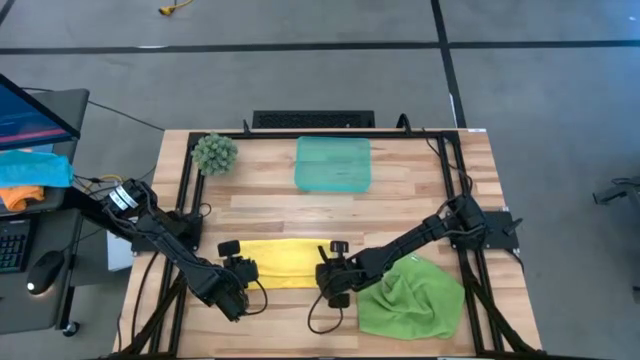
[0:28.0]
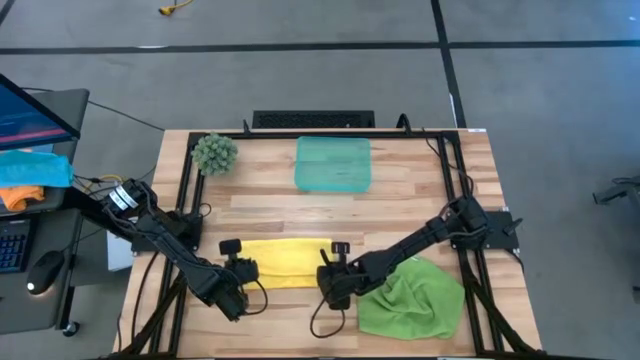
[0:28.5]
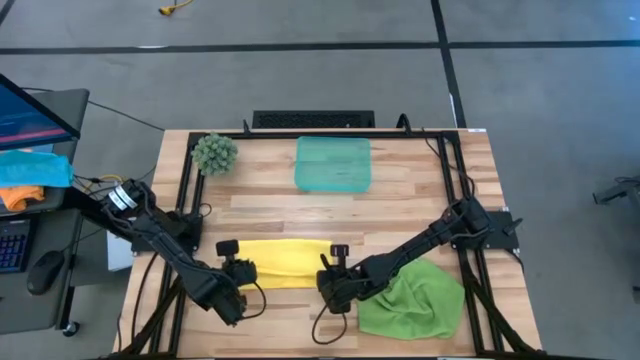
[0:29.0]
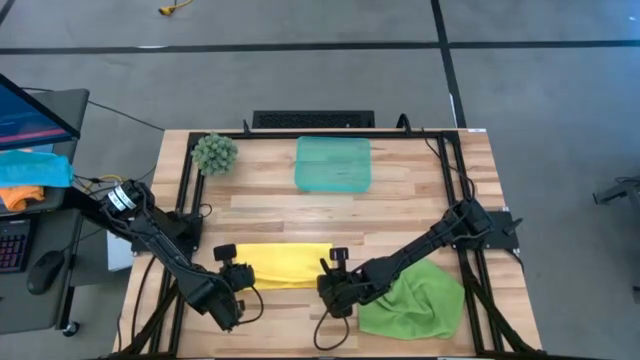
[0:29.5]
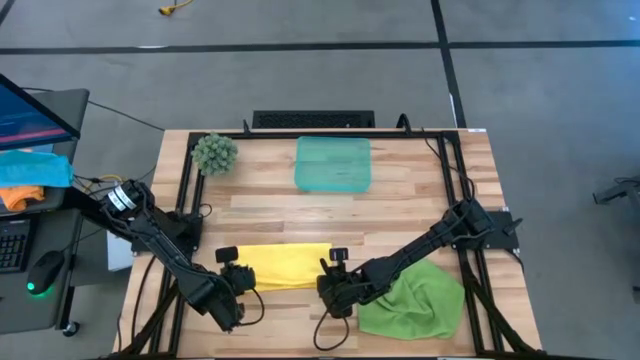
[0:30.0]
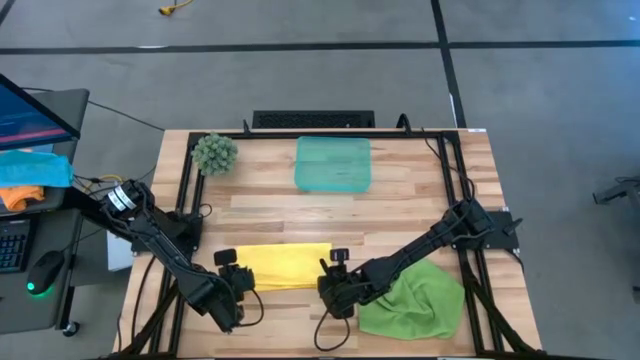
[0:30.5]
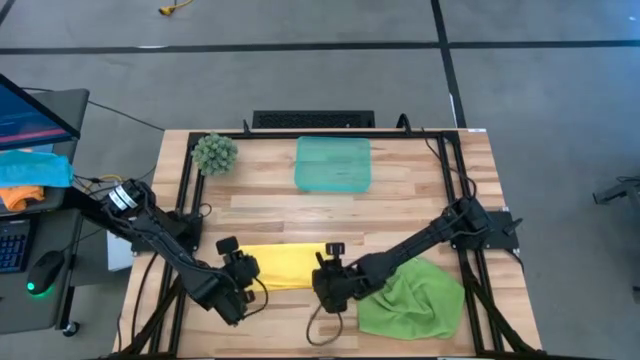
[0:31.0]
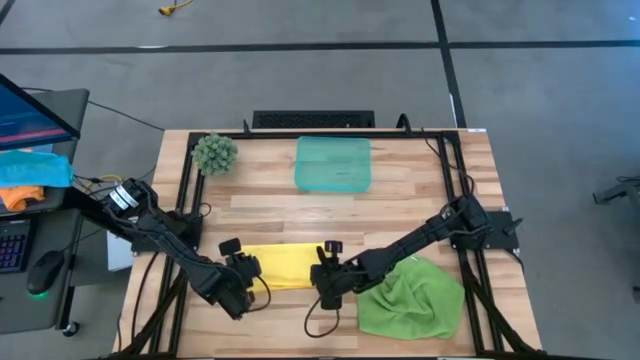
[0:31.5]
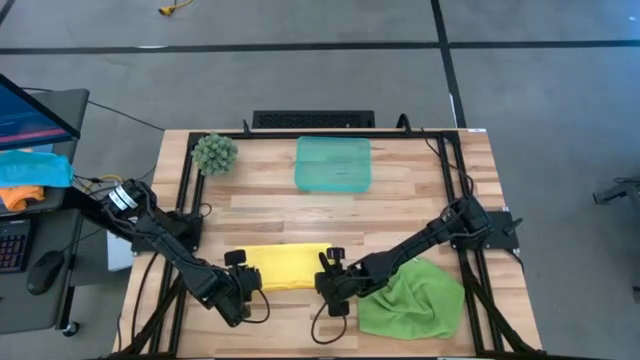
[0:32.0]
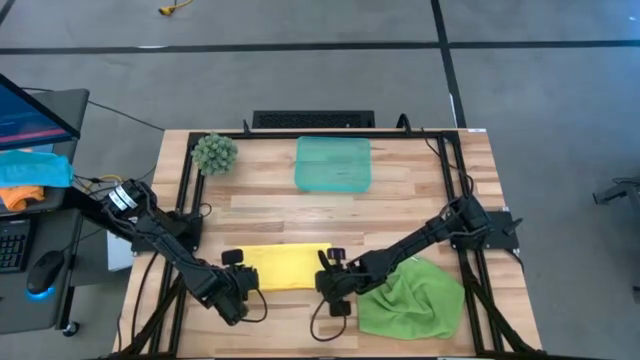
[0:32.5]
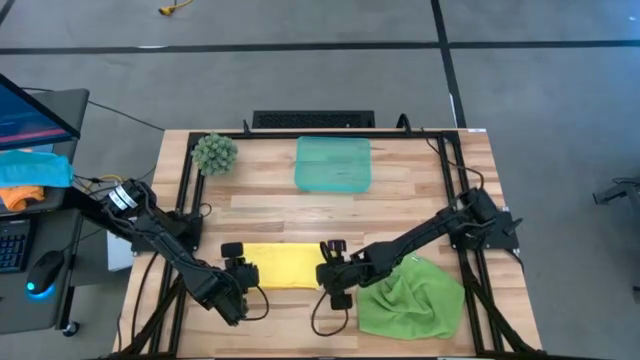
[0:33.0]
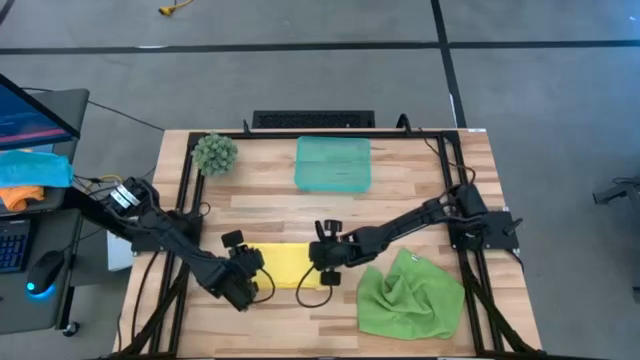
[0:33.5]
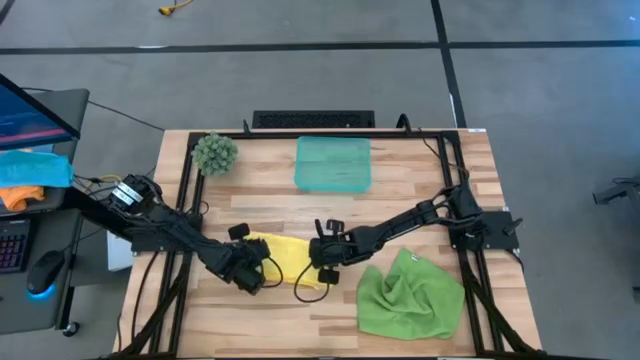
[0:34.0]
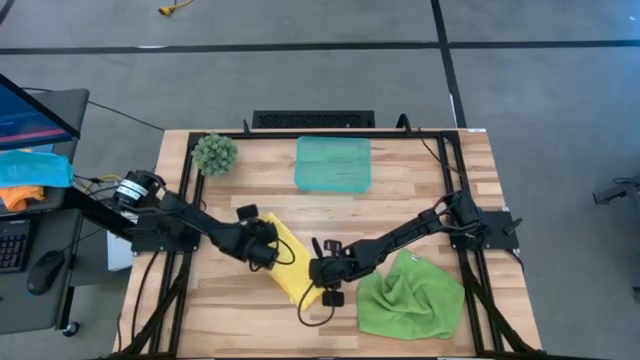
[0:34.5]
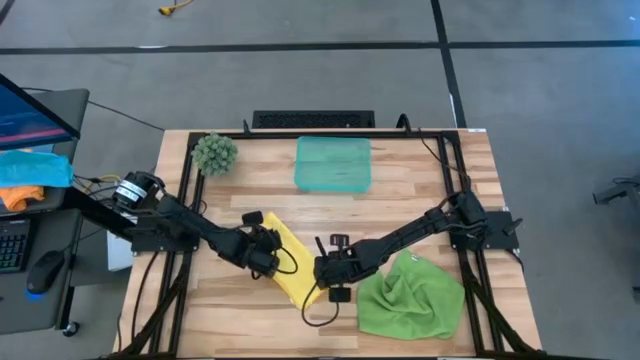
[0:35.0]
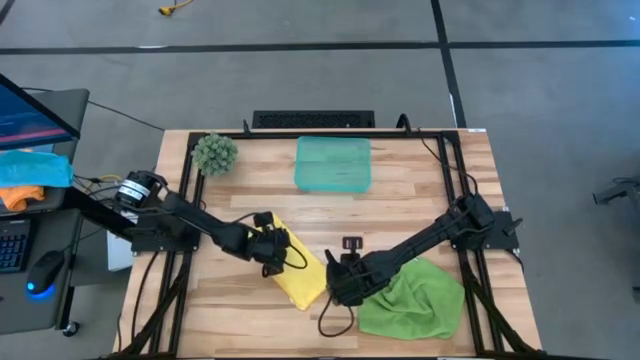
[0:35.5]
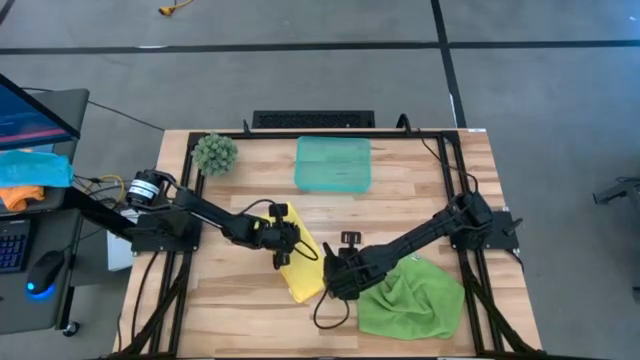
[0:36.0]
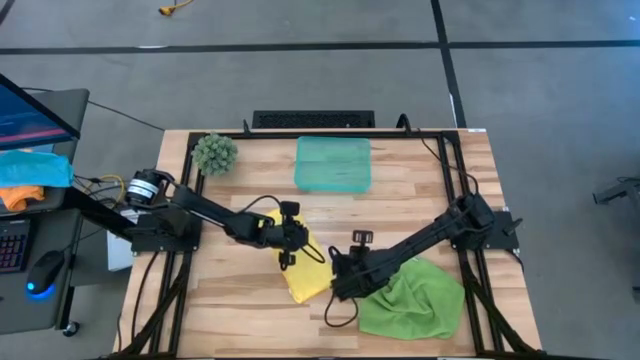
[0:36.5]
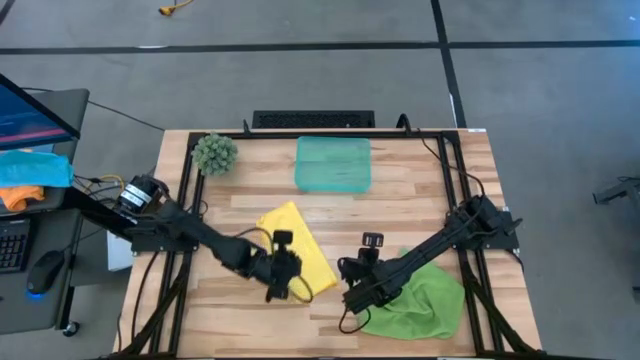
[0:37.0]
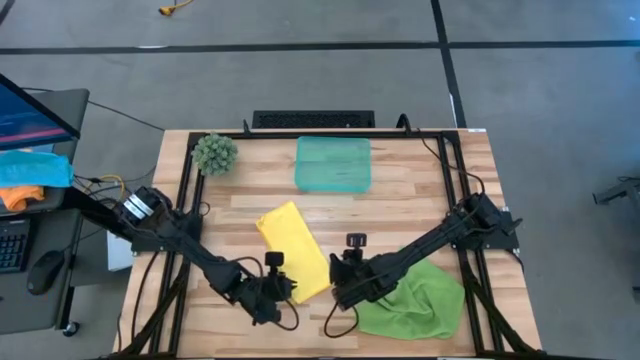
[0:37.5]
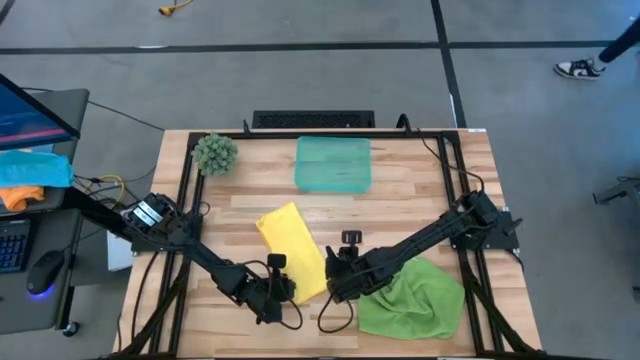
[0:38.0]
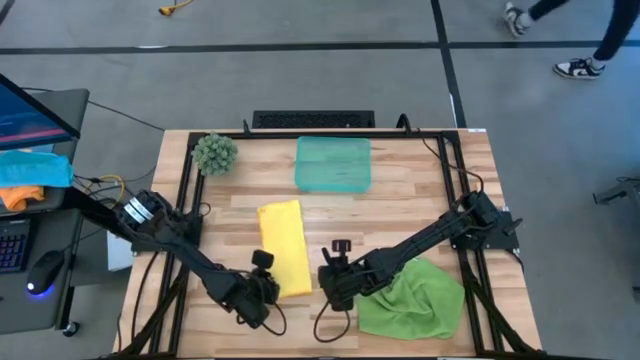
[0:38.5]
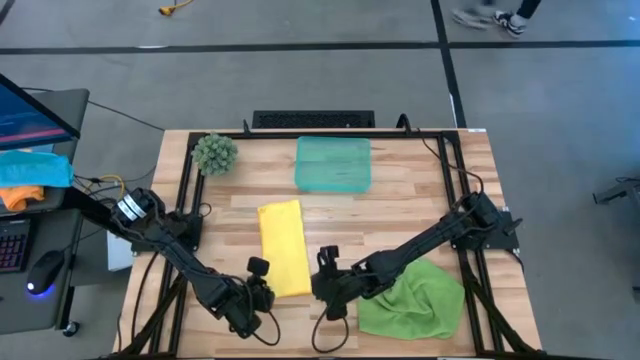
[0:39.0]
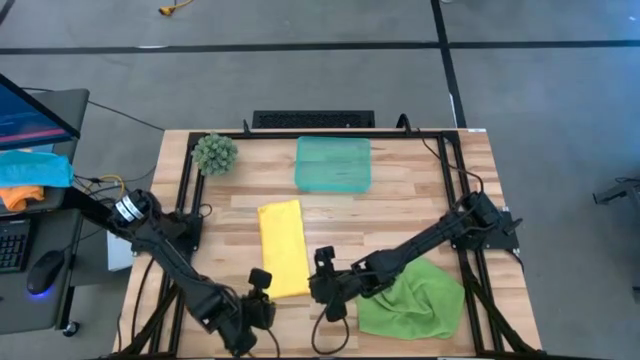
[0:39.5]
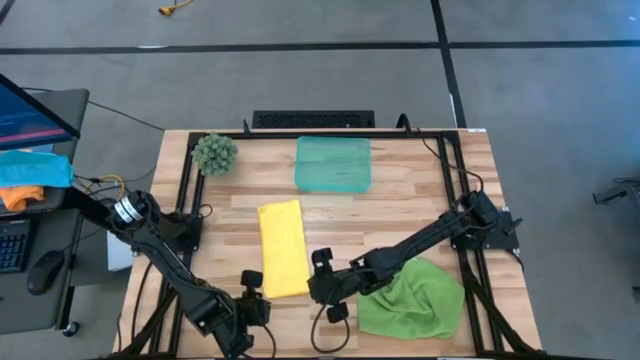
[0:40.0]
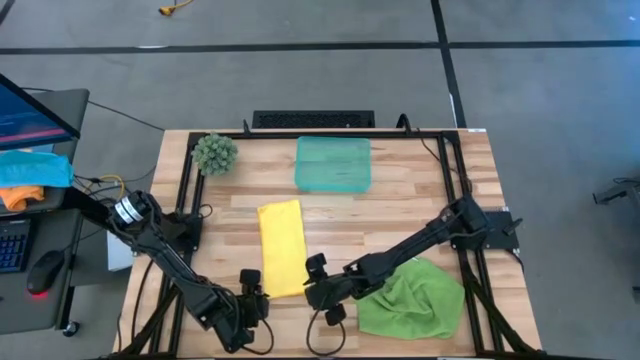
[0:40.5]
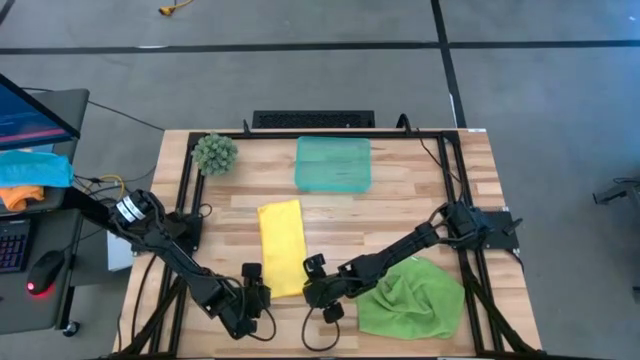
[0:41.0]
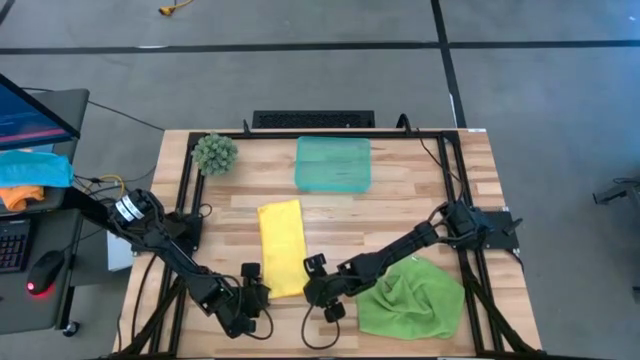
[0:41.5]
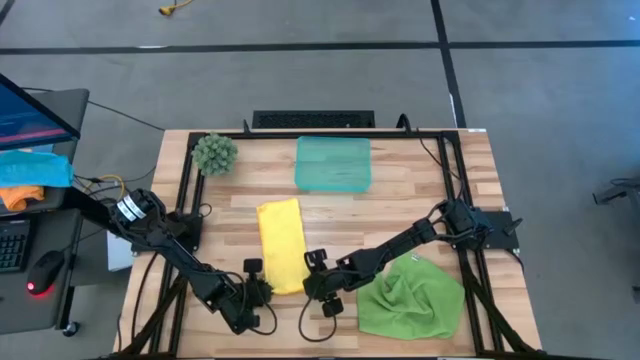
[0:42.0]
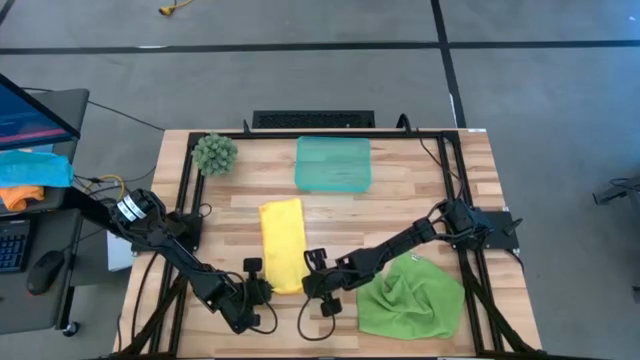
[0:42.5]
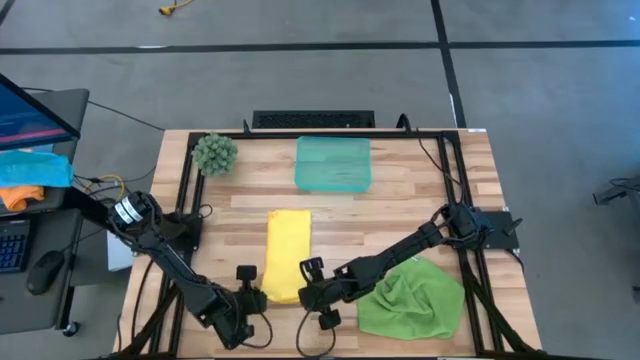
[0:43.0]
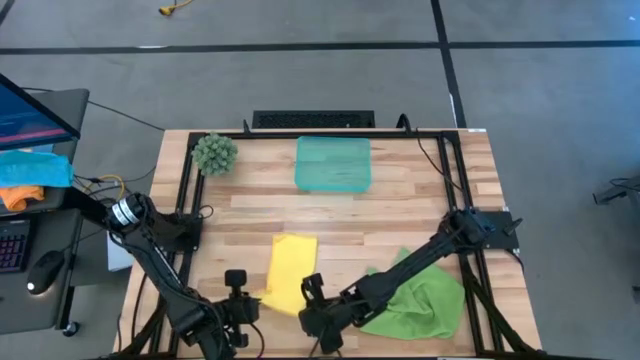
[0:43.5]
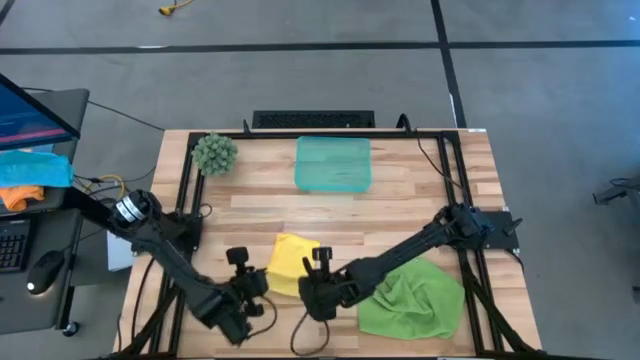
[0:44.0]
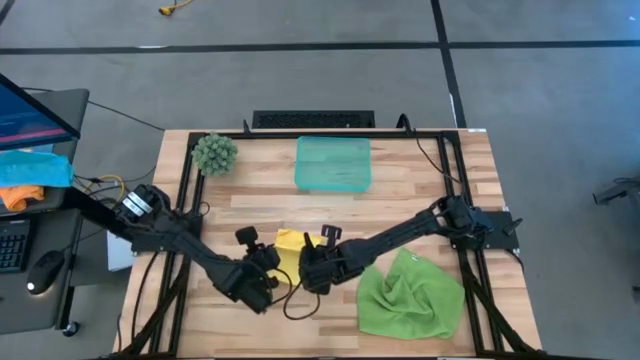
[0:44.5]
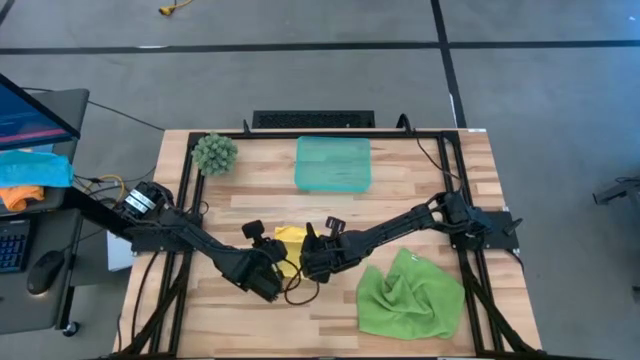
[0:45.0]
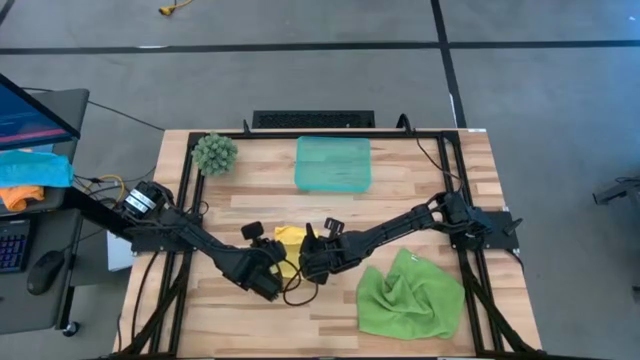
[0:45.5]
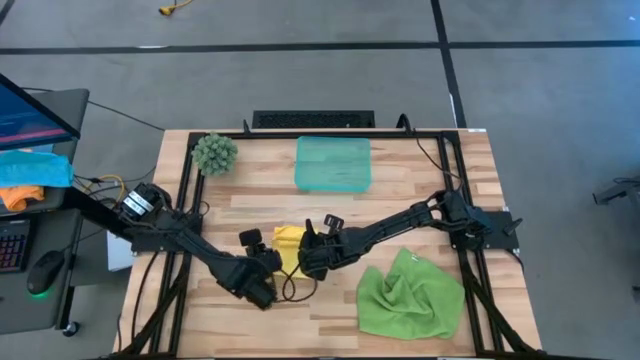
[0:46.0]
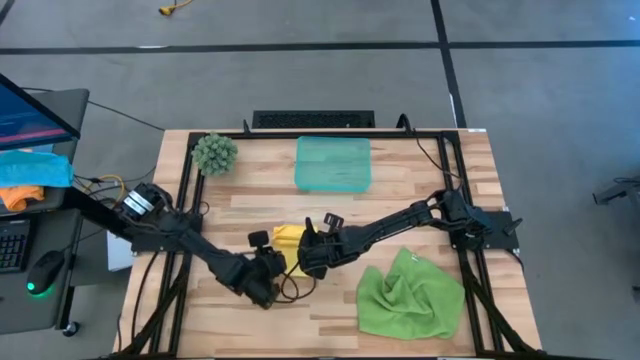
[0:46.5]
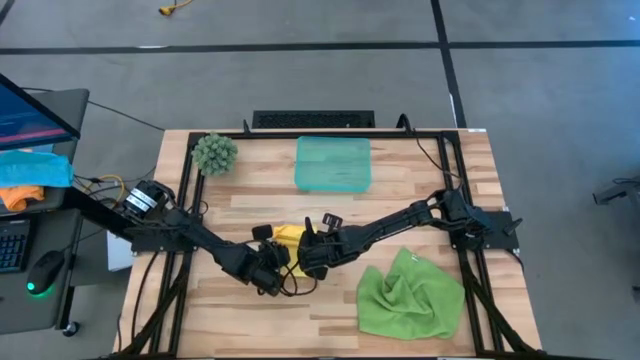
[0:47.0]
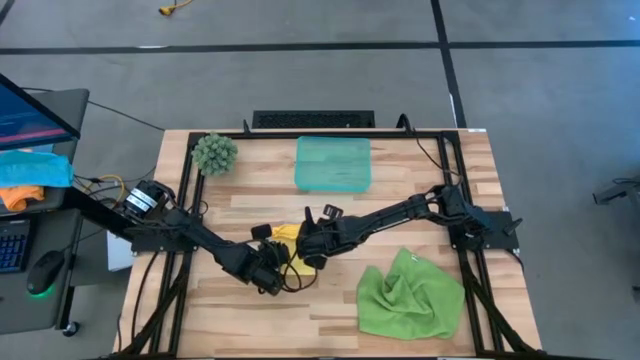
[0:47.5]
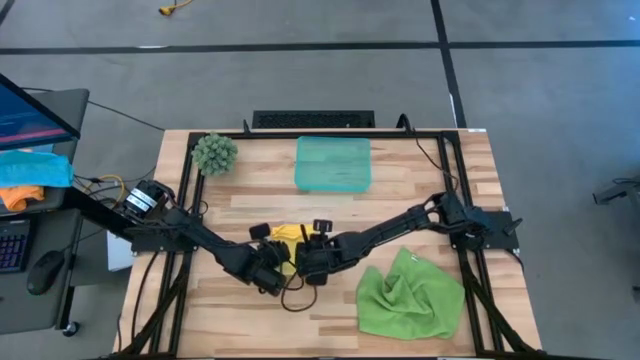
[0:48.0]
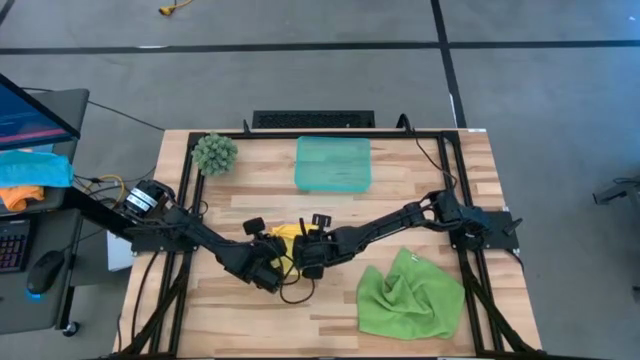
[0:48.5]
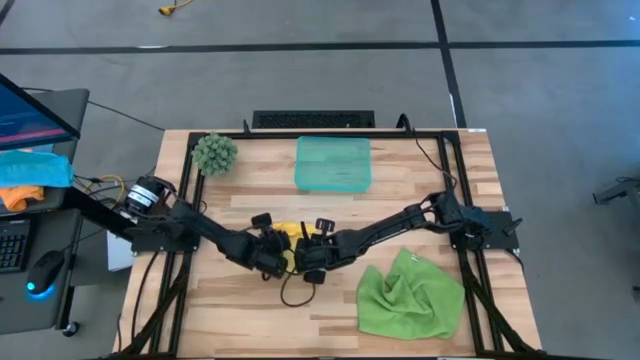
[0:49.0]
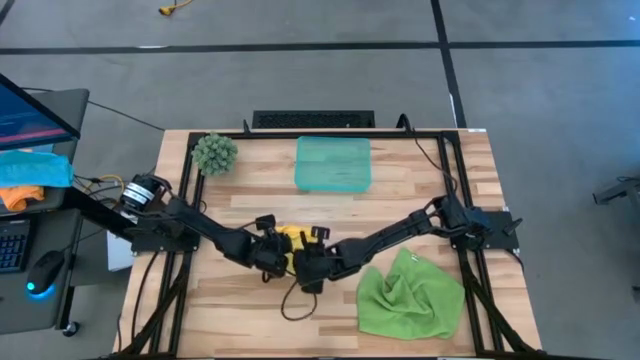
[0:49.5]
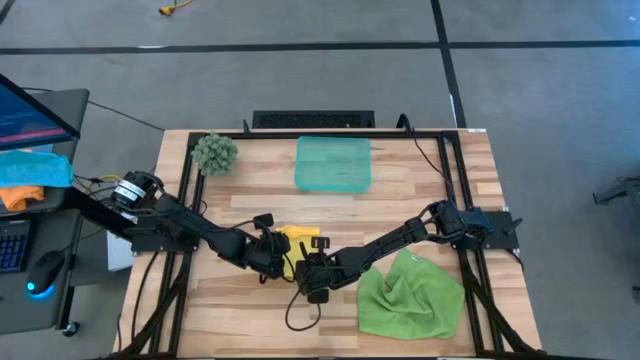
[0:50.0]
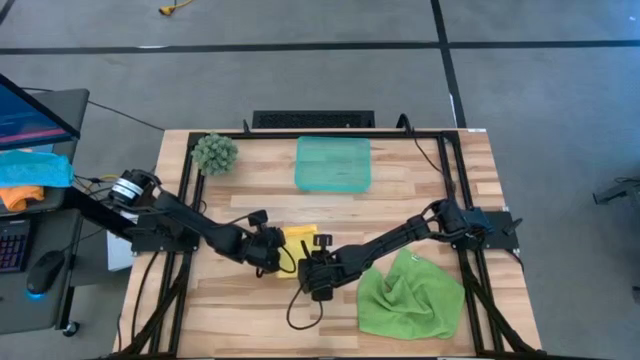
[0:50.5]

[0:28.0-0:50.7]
Task: Roll microfiber towels into tight, uniform cylinder then place into a basket
Fold the yellow microfiber cloth
